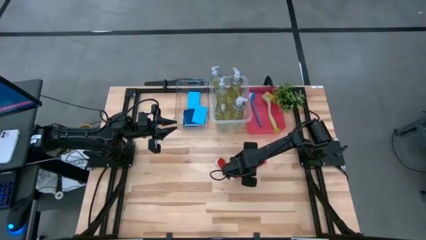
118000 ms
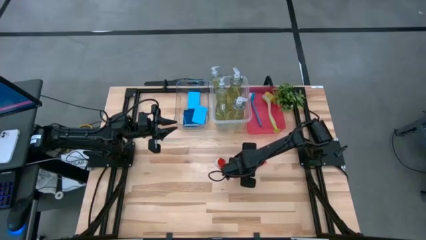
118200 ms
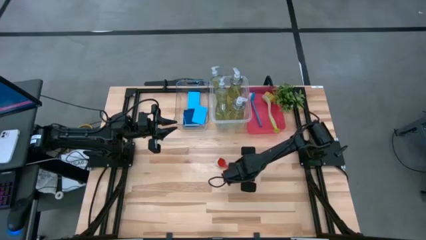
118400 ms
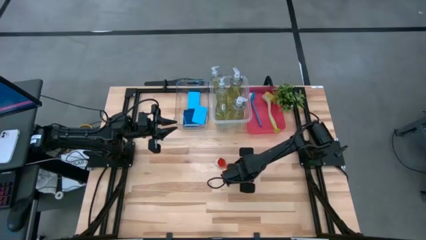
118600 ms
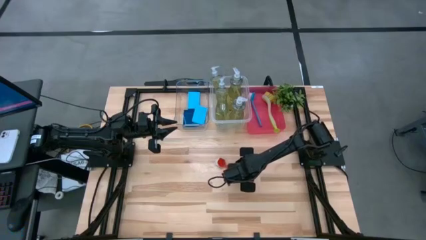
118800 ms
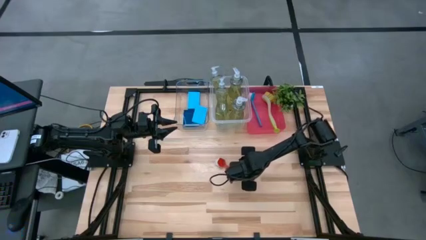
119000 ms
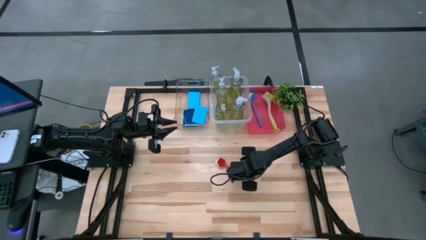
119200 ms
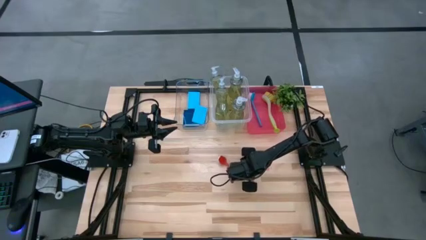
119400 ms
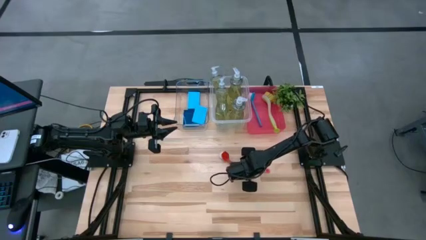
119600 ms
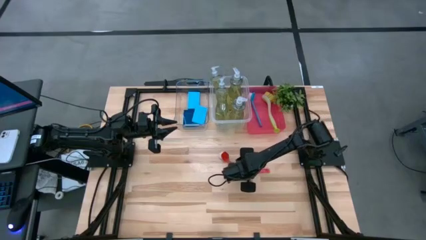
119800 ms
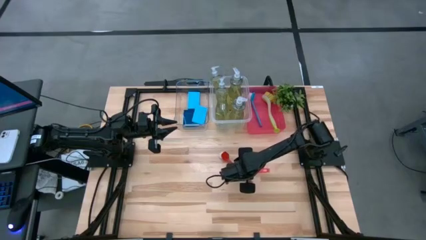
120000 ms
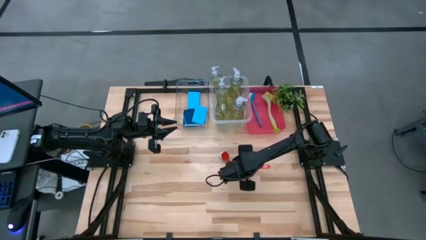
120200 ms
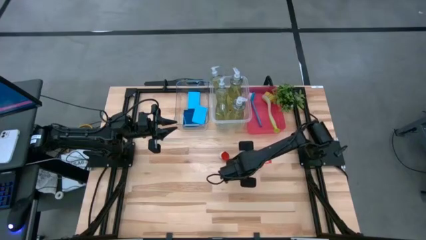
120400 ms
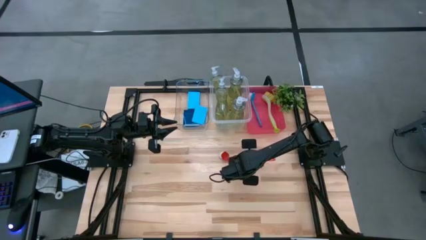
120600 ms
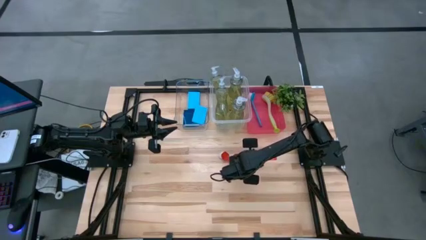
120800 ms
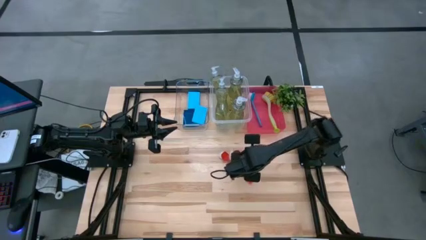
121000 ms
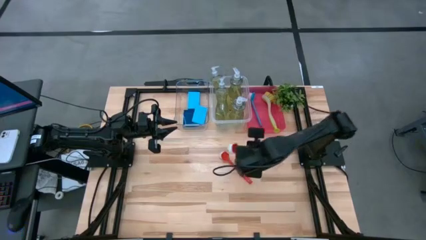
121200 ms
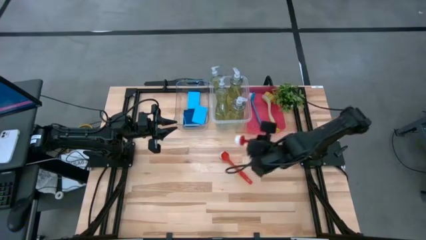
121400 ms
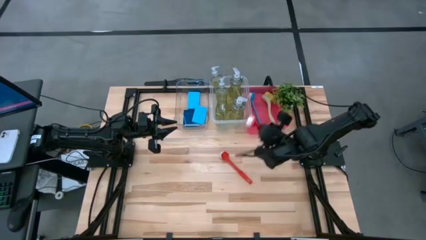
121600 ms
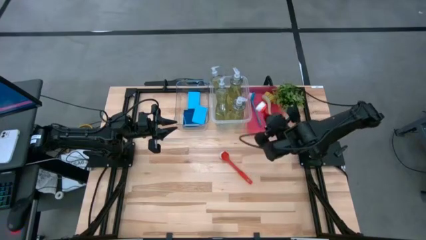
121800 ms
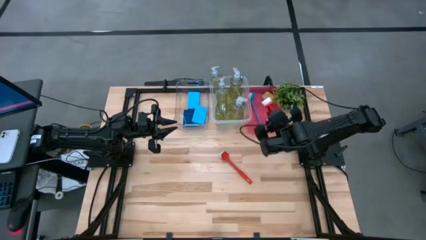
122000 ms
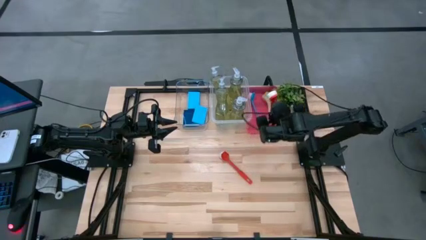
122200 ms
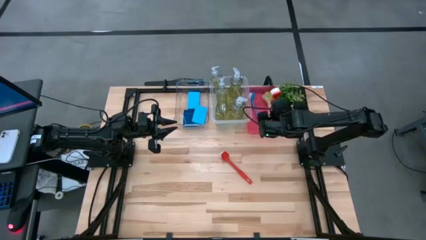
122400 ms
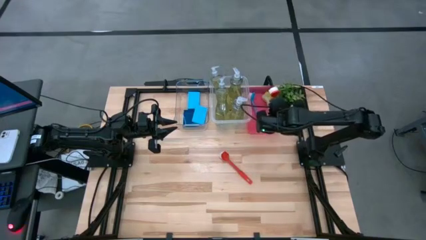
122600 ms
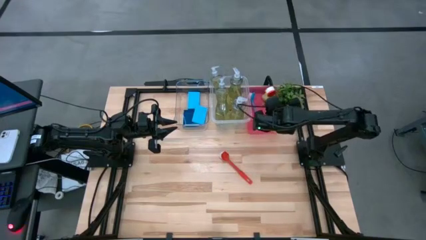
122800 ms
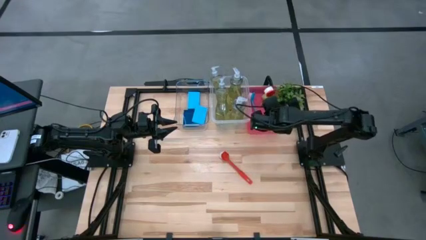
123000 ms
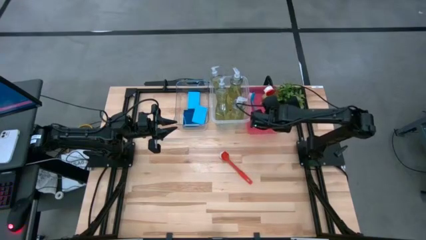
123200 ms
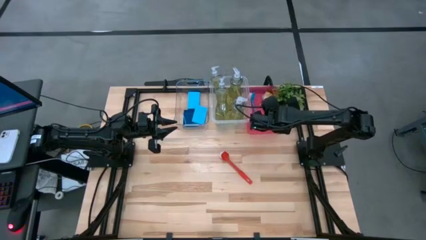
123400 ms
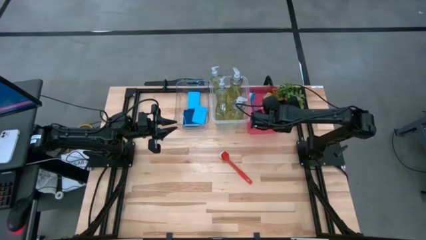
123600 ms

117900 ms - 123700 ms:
Task: Pick & Place Kitchen Sink Supplies
Put the red dish brush into the red bin

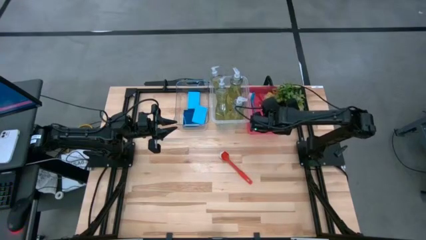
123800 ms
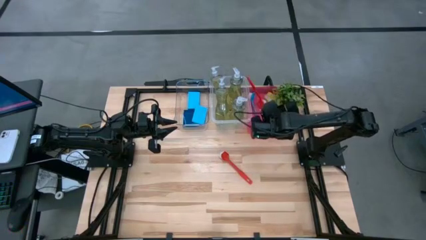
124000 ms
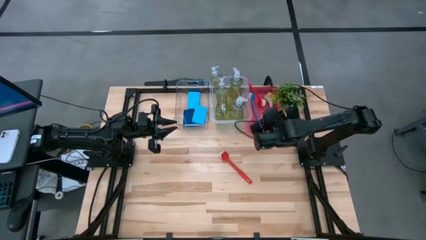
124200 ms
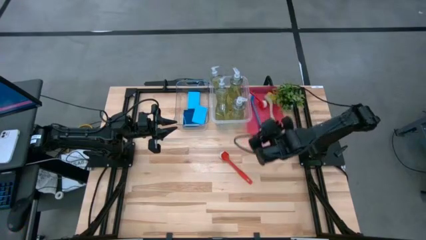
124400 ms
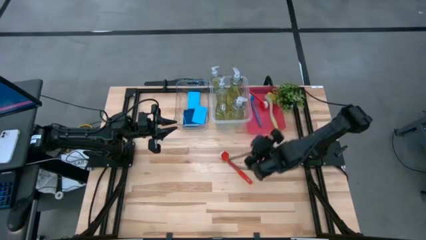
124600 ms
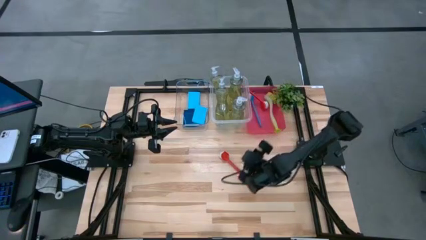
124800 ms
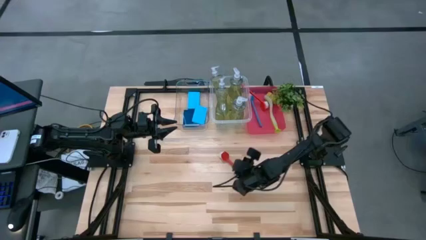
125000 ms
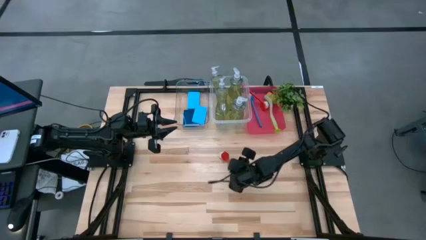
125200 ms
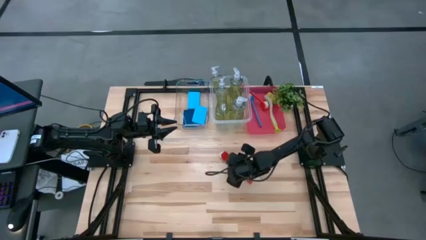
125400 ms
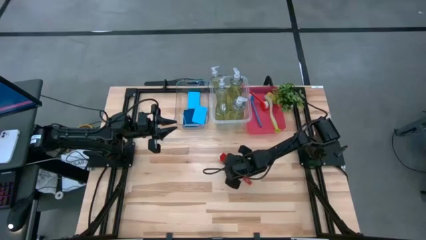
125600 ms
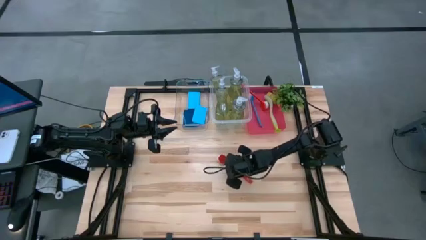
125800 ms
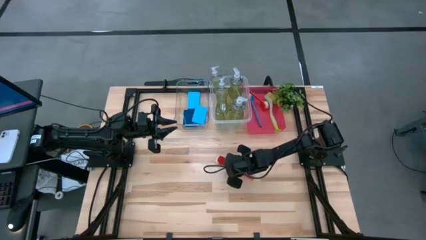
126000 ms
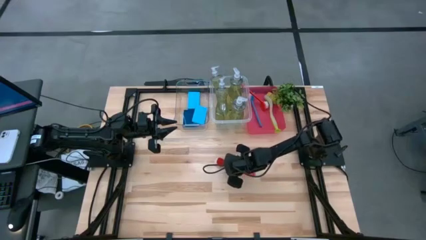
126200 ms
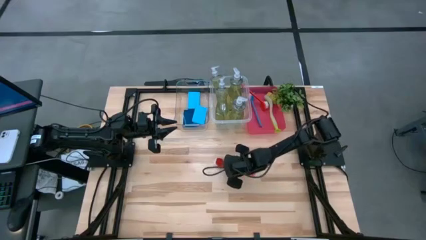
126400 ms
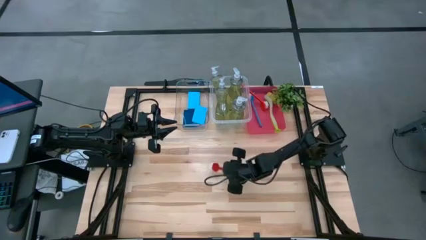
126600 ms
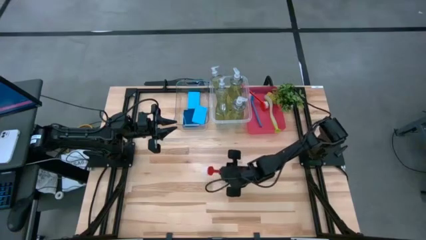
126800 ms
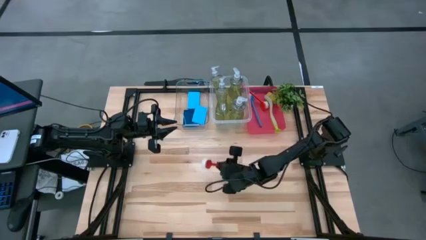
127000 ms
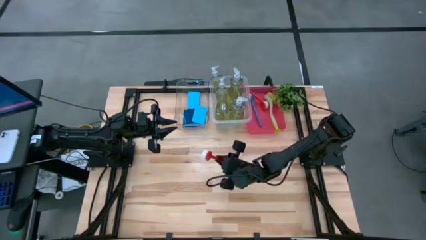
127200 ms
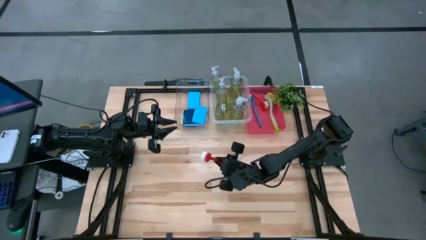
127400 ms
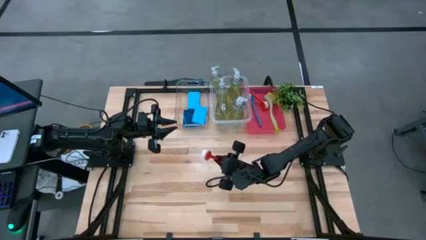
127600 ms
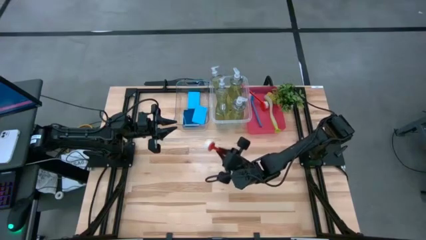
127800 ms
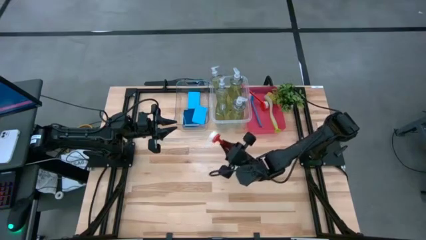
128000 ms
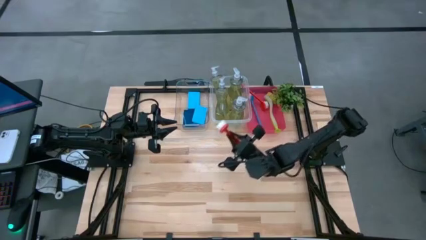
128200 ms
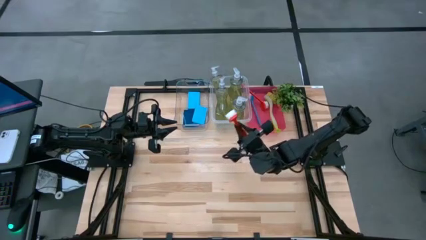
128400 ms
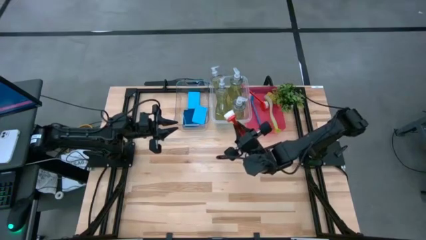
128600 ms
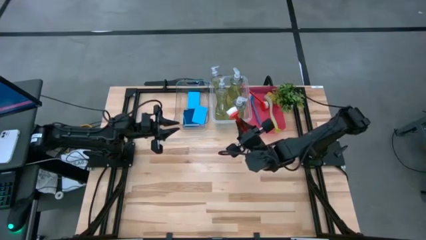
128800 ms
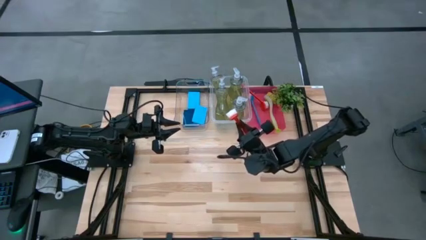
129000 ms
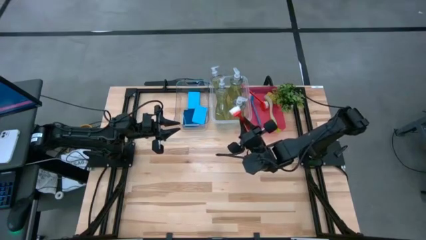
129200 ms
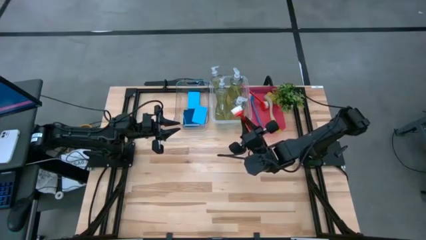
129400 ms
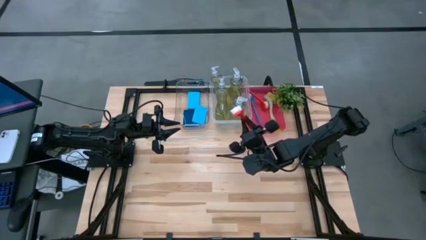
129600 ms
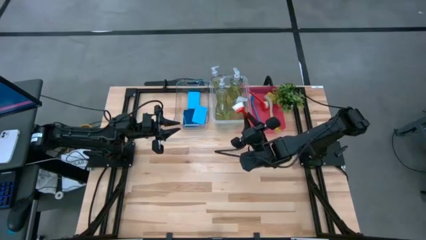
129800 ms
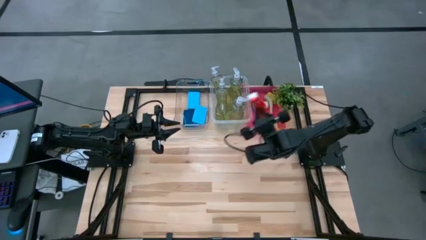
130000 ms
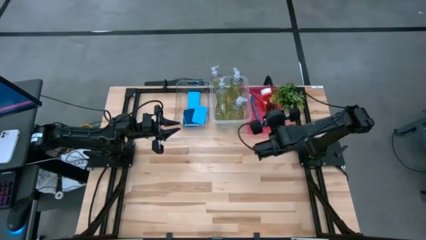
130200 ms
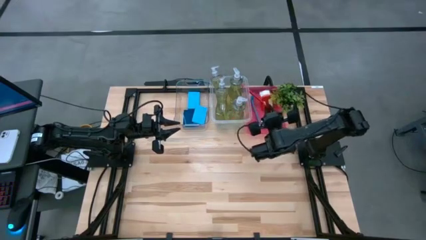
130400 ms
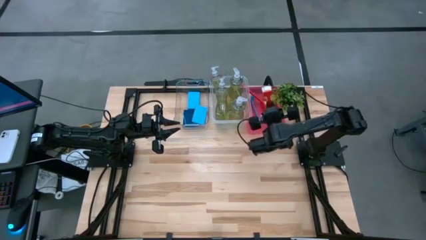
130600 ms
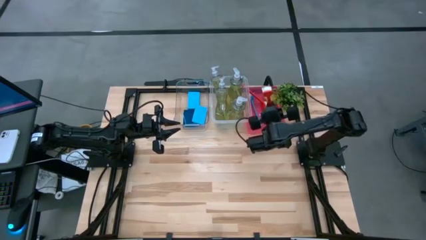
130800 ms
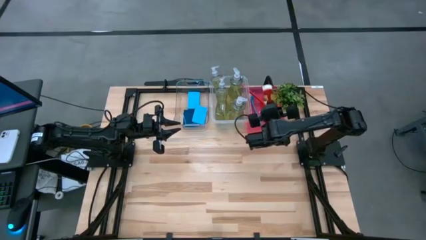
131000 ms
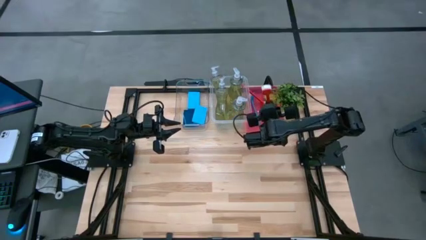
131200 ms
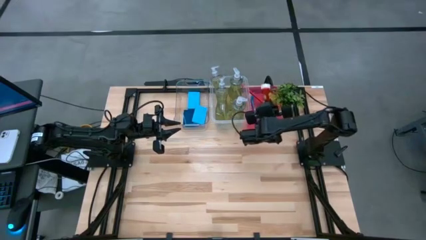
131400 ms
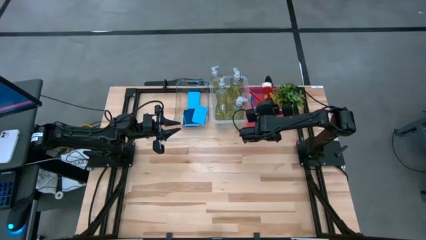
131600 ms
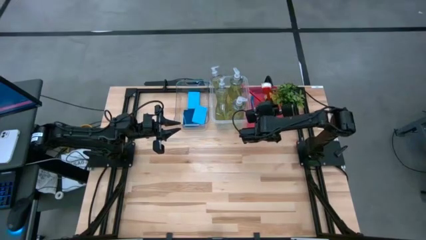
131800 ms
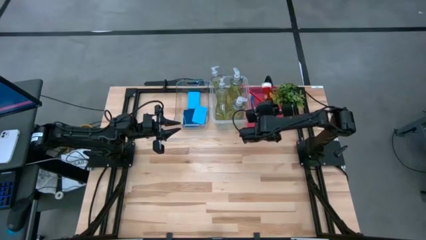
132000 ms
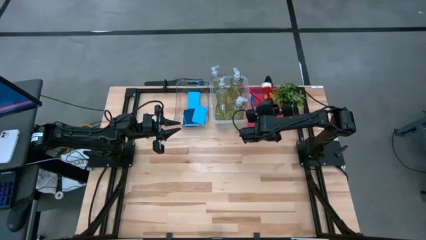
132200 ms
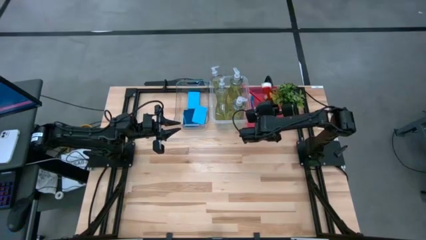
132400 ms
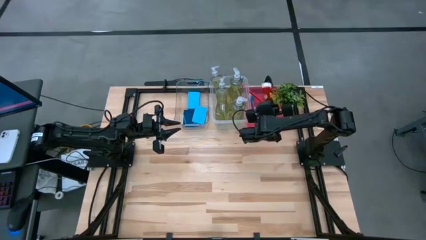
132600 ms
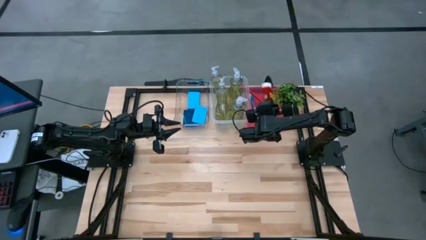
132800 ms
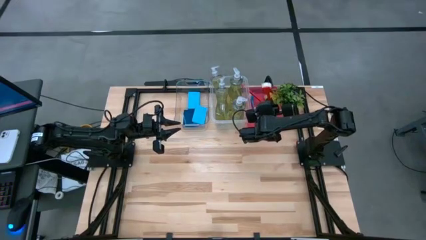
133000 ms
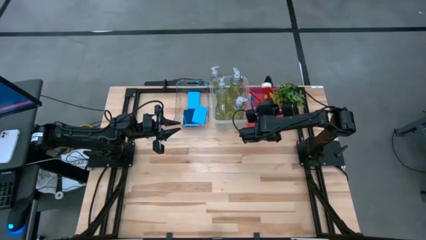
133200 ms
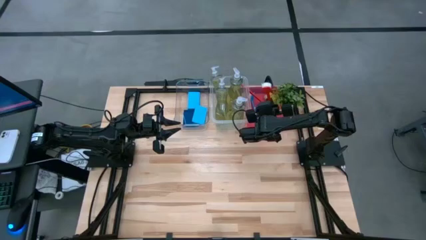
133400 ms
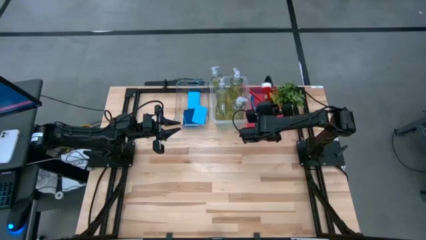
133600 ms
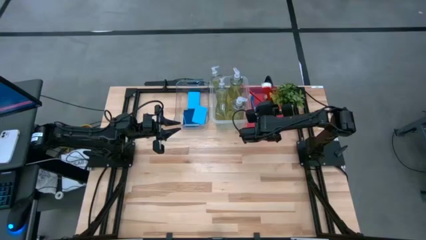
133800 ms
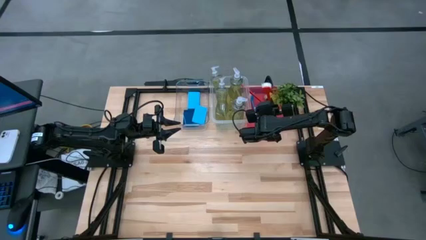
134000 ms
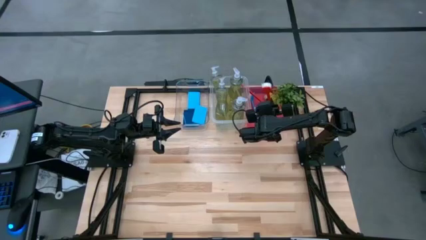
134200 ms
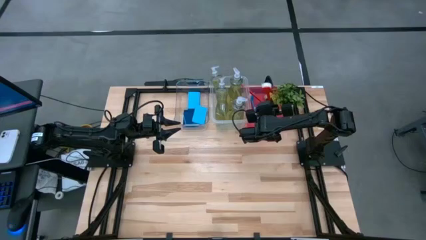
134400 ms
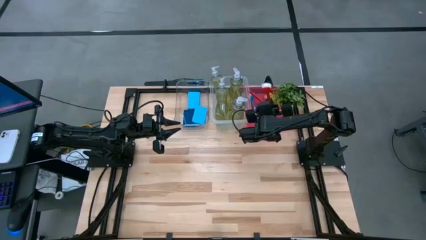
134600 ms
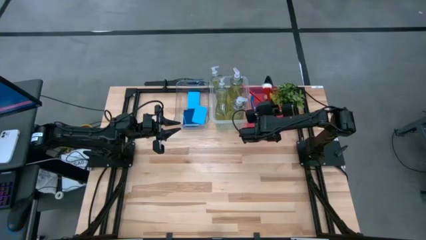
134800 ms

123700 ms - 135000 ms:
Put the red dish brush into the red bin
